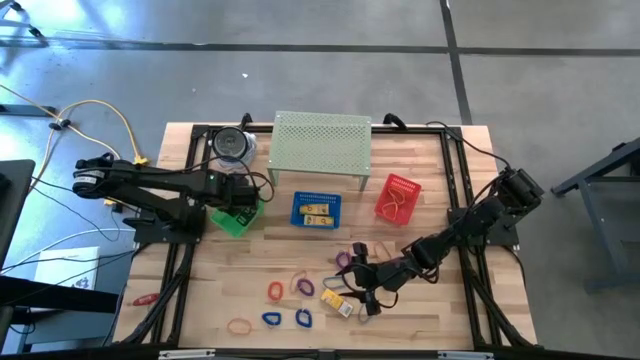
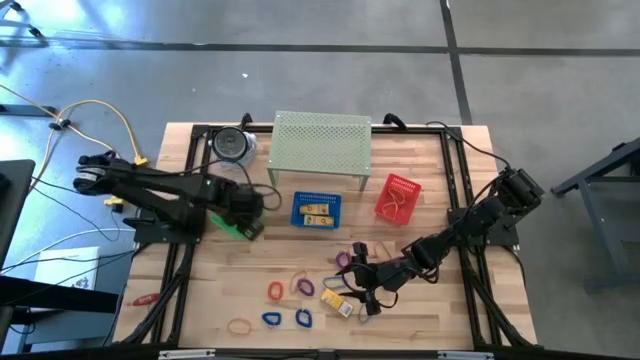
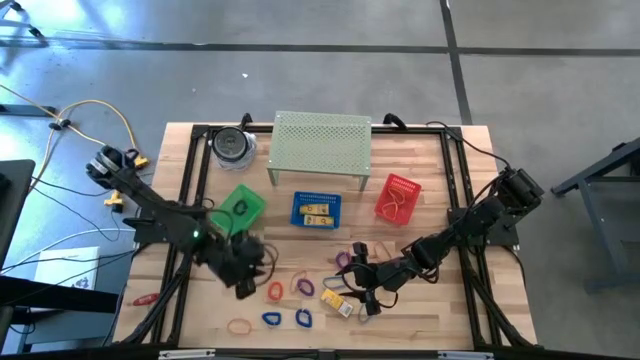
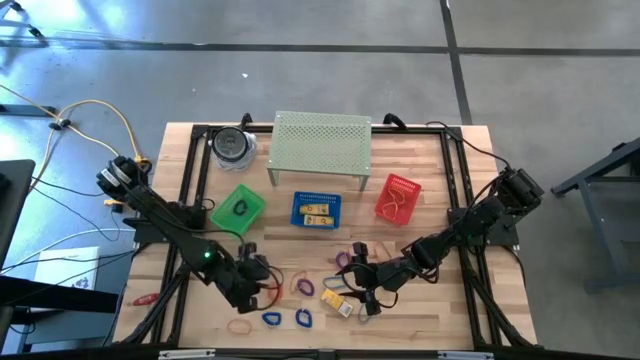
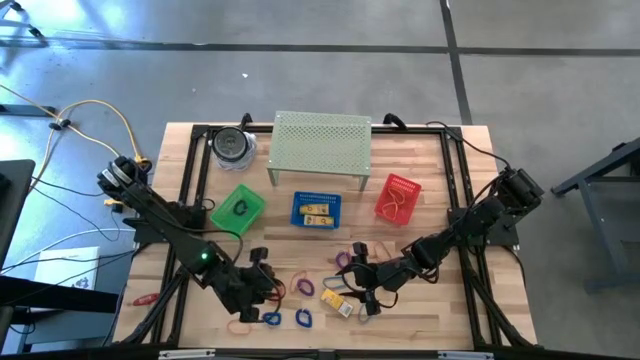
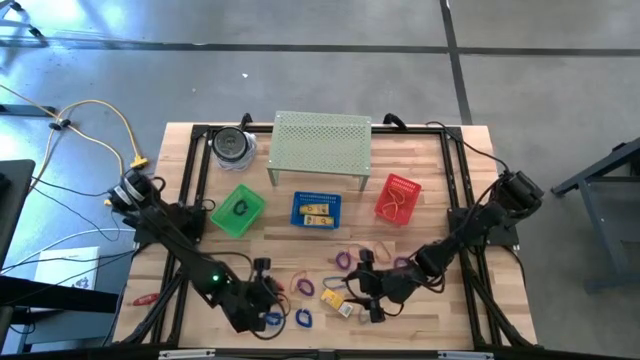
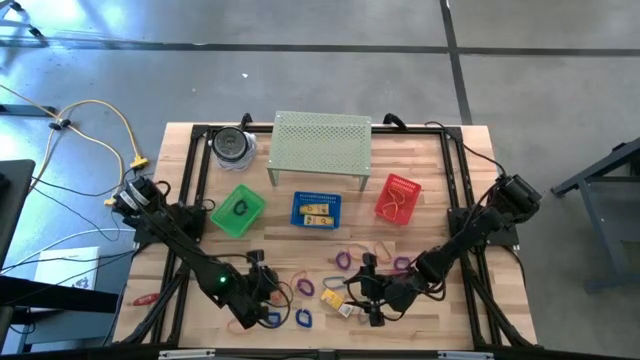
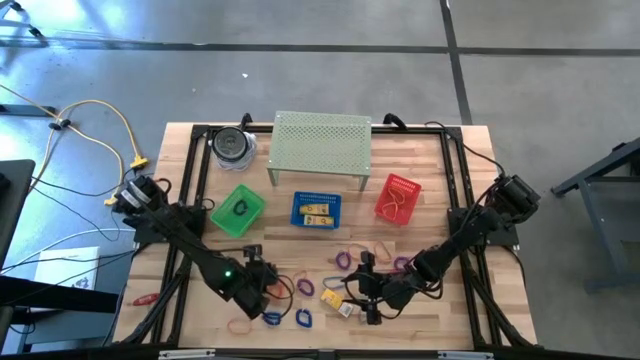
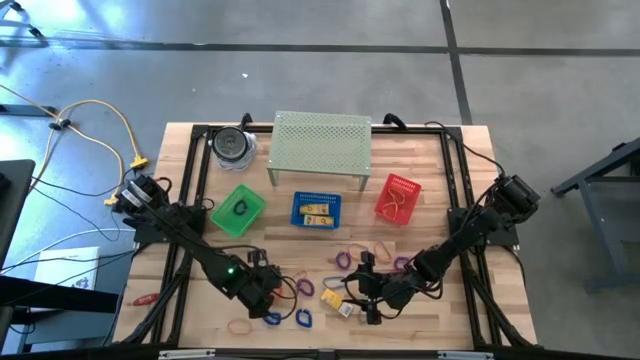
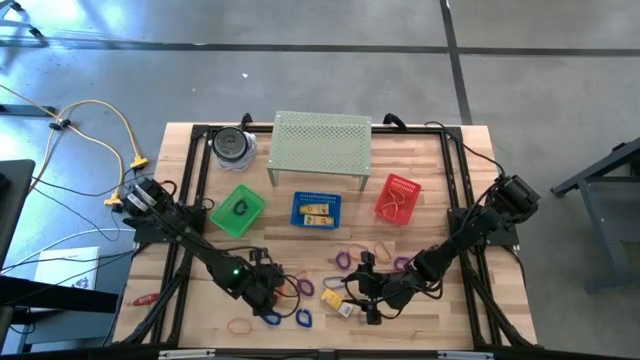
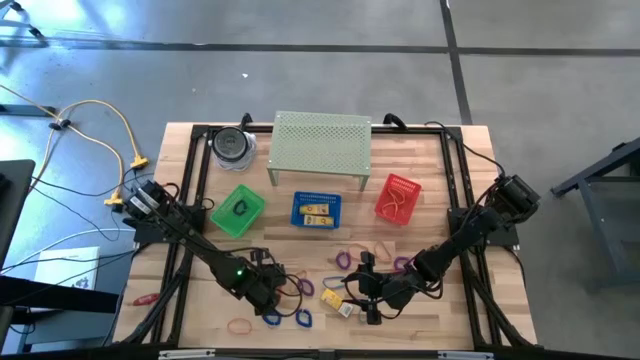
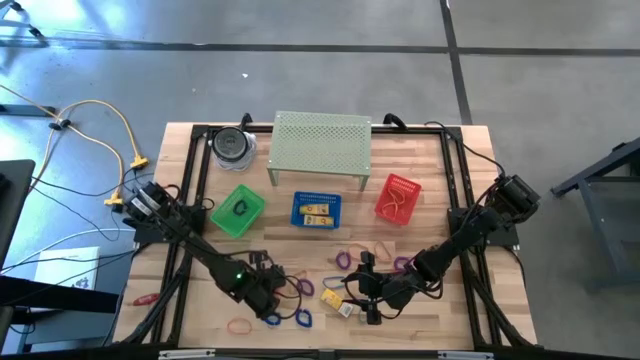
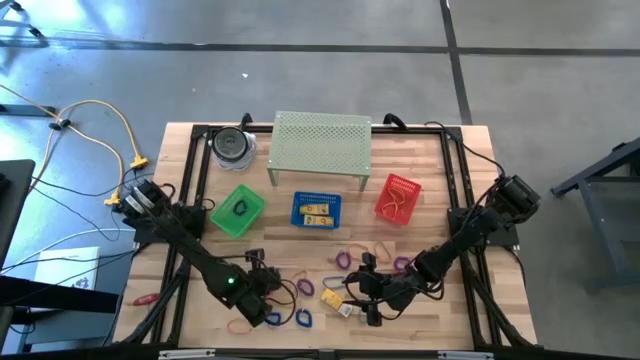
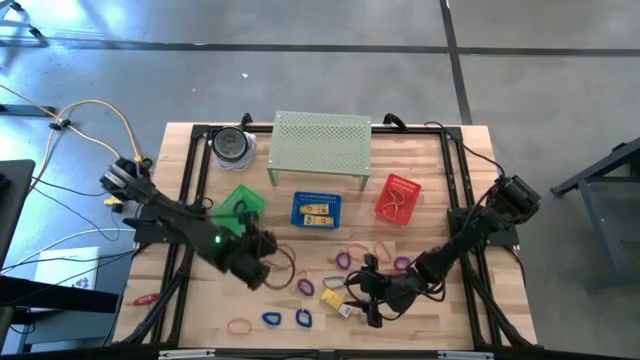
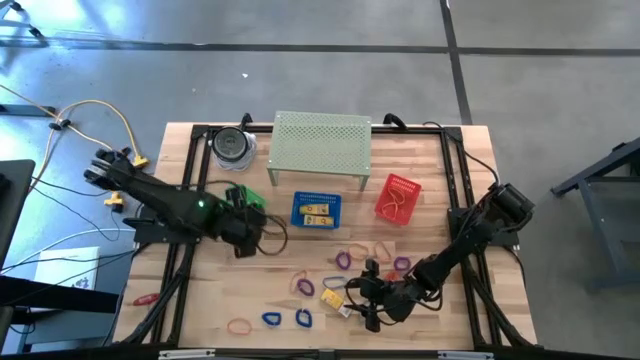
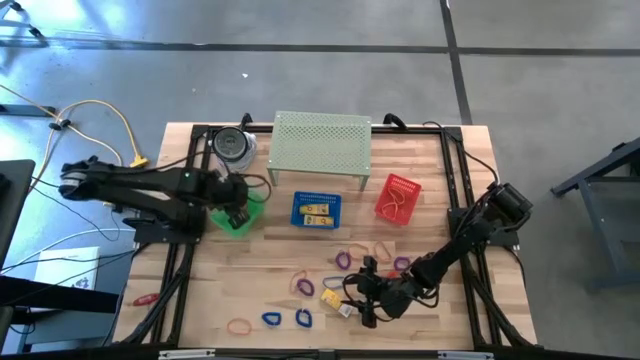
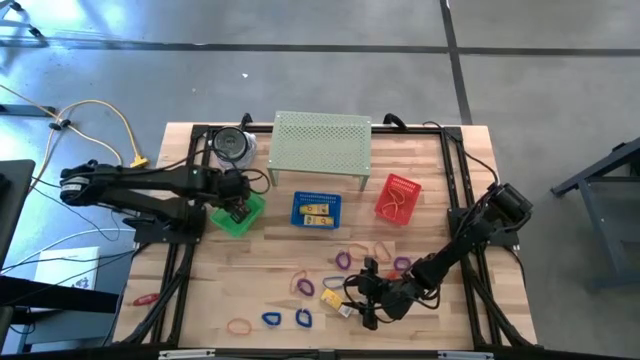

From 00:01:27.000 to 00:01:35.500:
Task: Pick & Place Office Desk Supplies
Put the orange spring keychain into the green bin

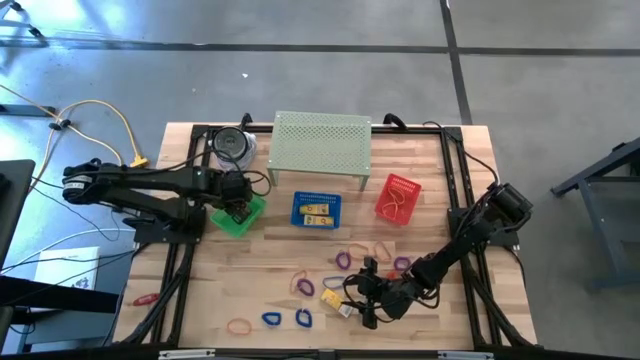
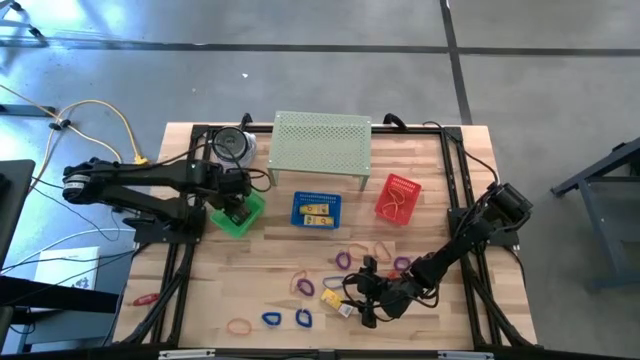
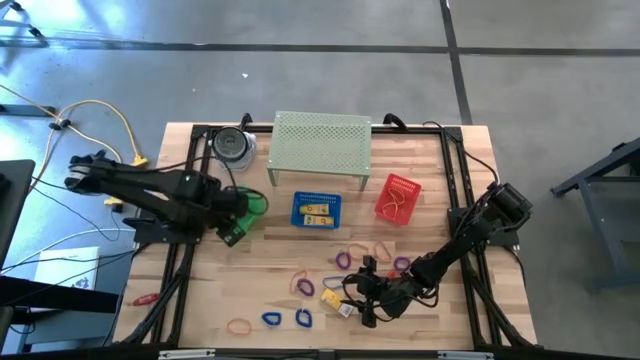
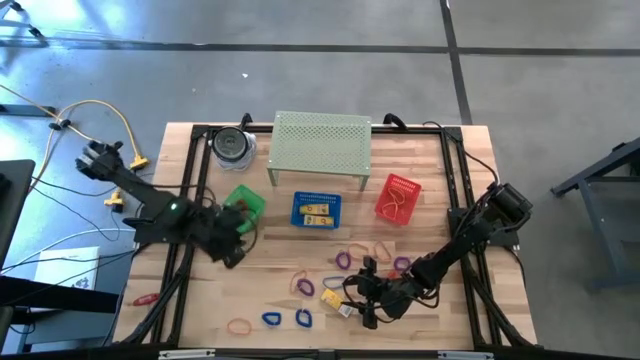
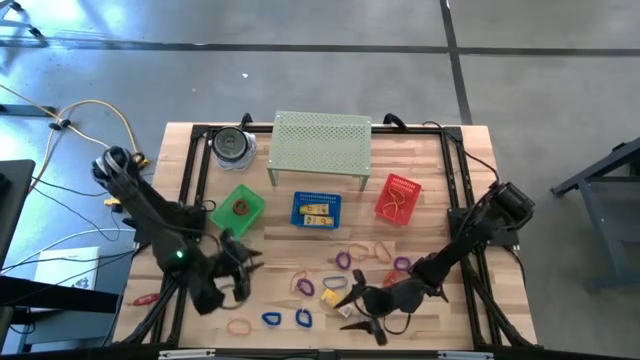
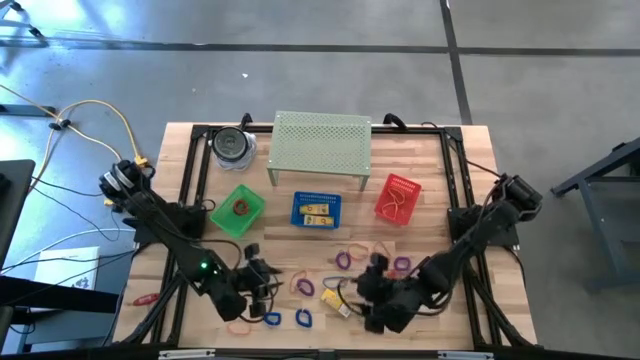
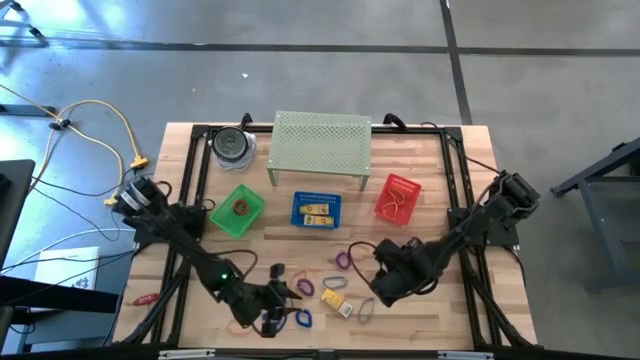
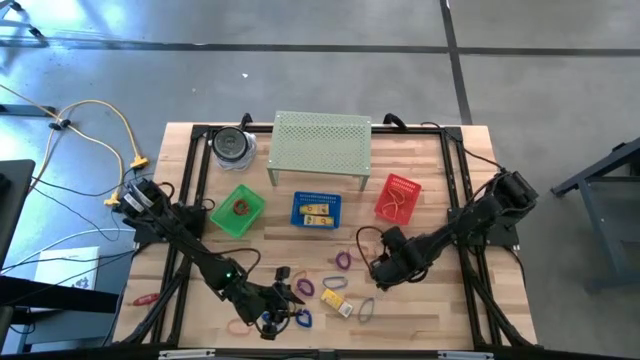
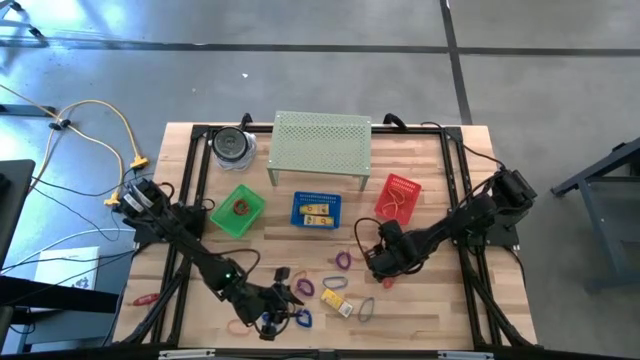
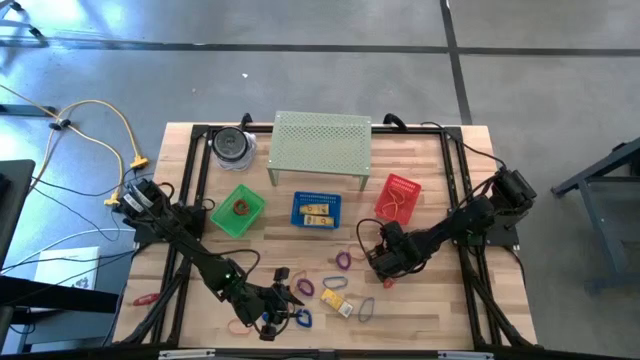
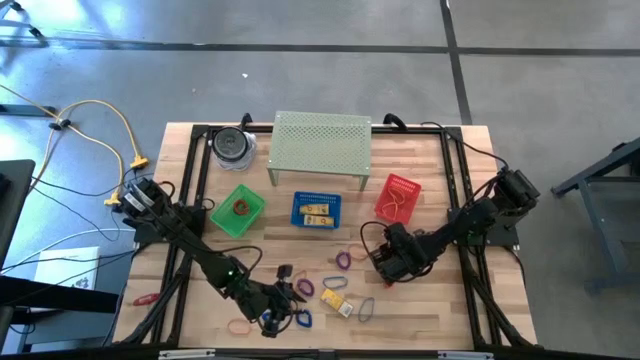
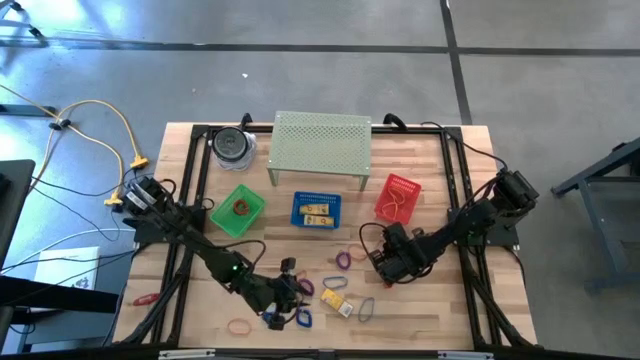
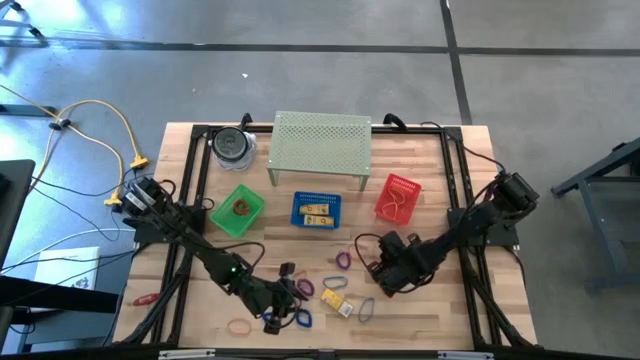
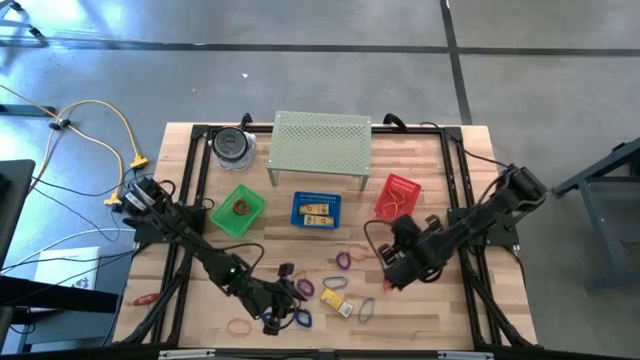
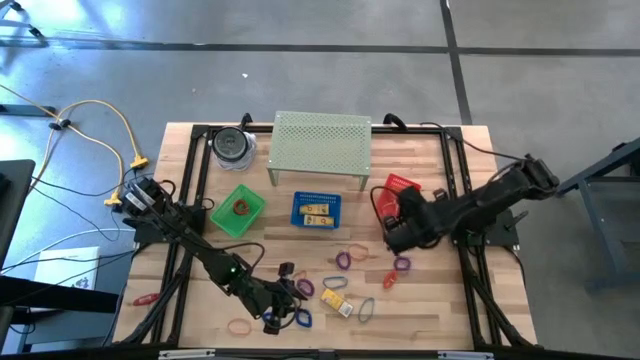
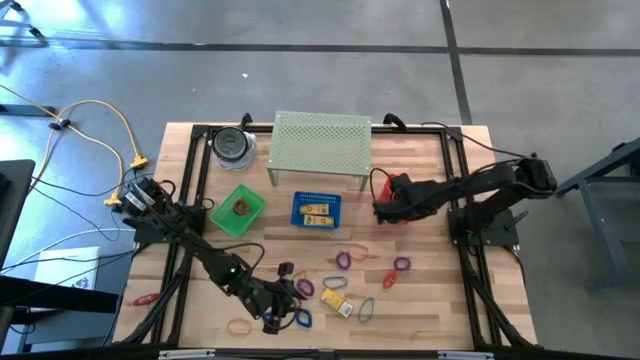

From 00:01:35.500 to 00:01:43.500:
Put the orange rubber band into the red bin

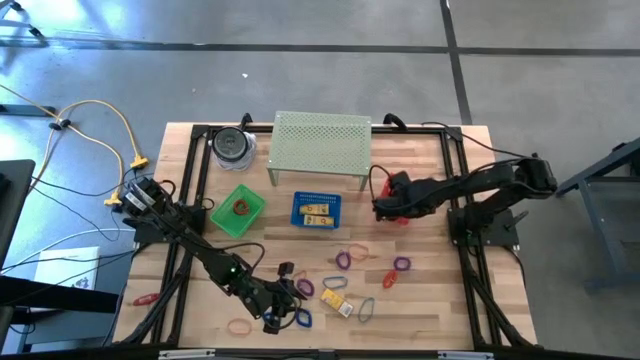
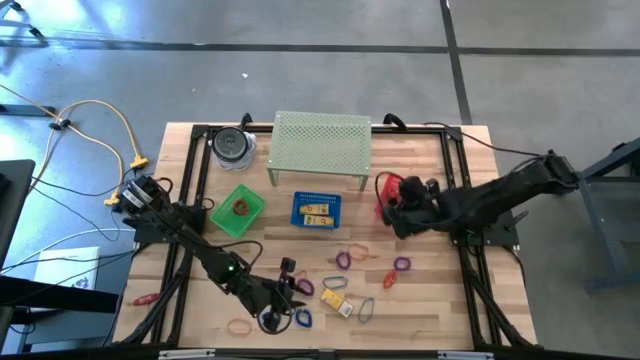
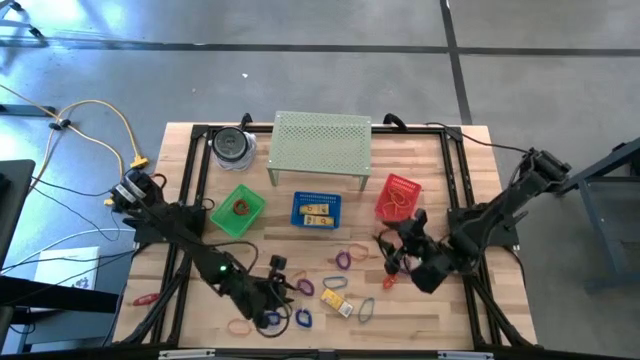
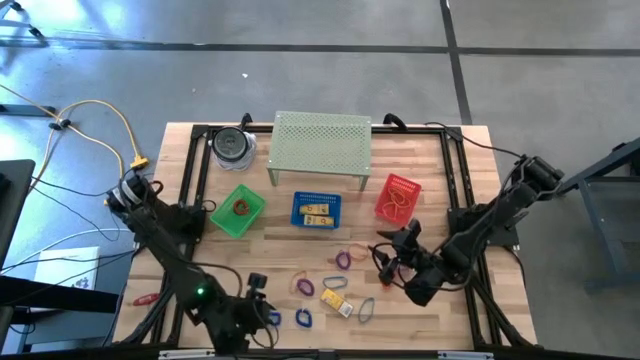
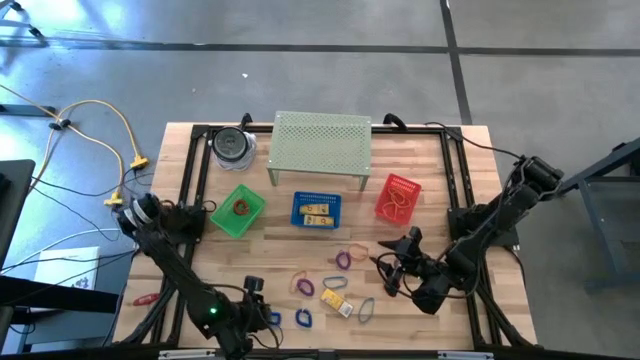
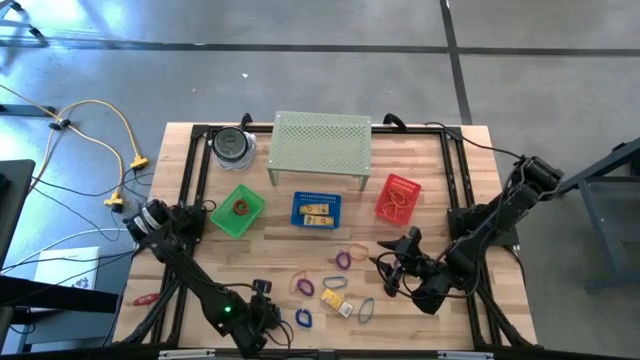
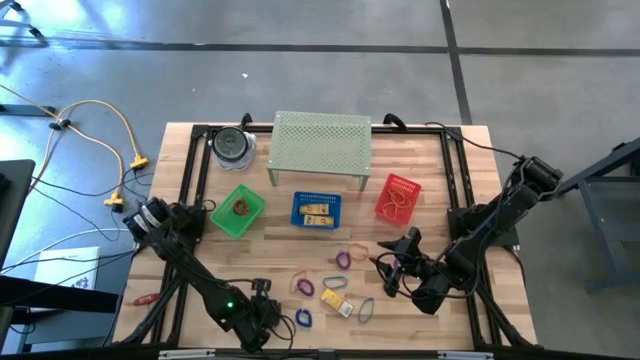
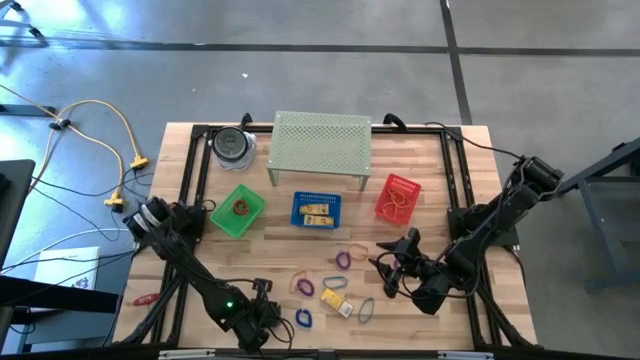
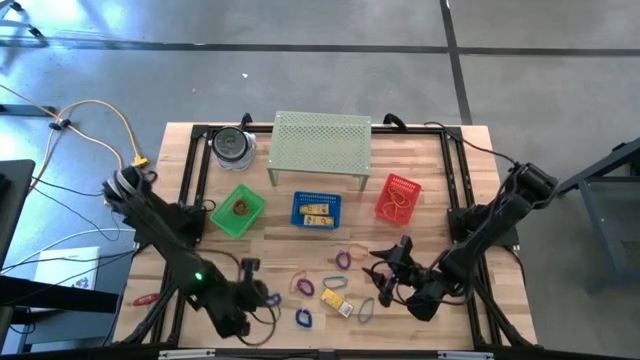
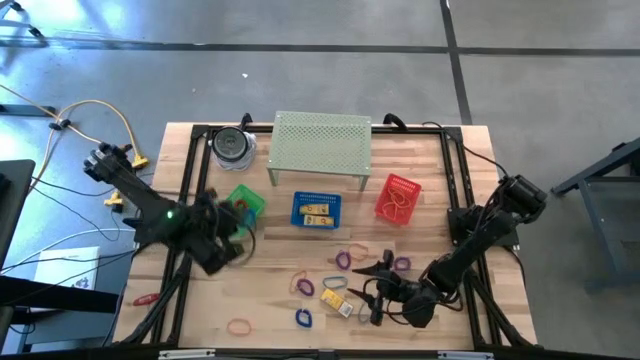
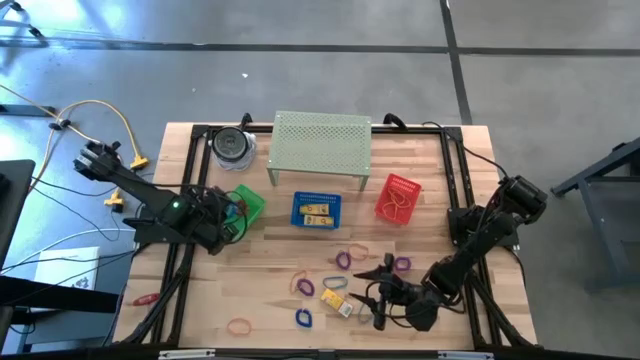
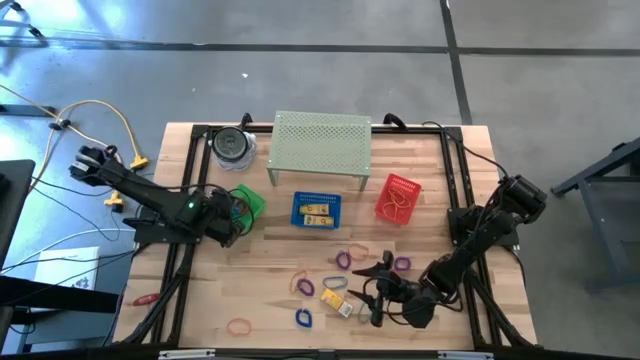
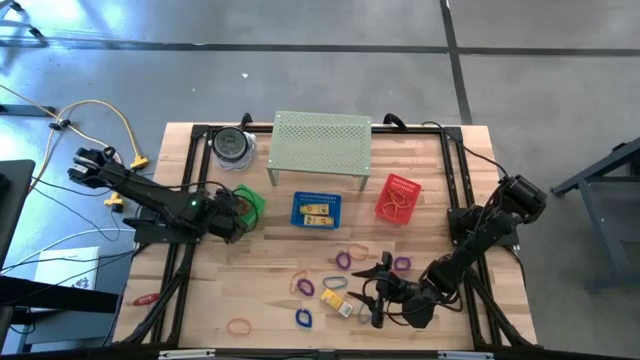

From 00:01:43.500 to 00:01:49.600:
Put the blue spring keychain into the green bin
